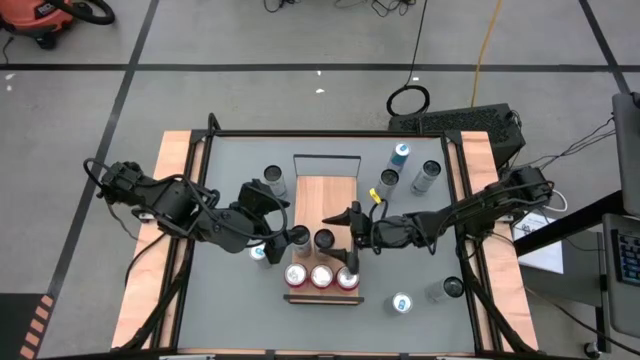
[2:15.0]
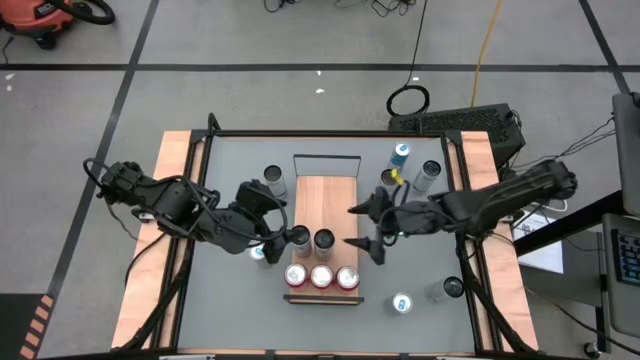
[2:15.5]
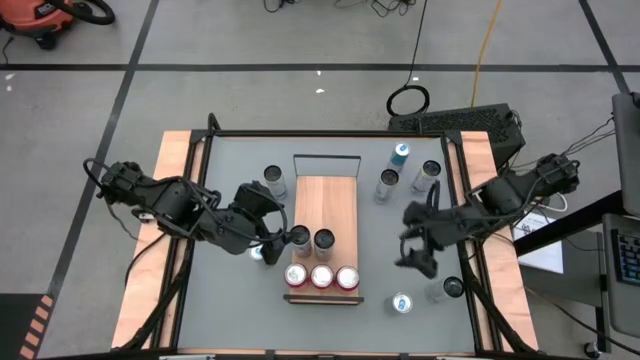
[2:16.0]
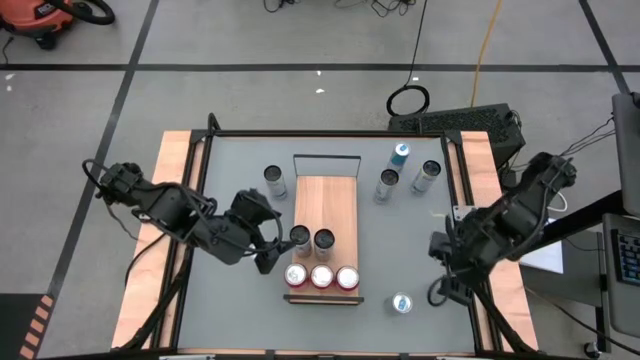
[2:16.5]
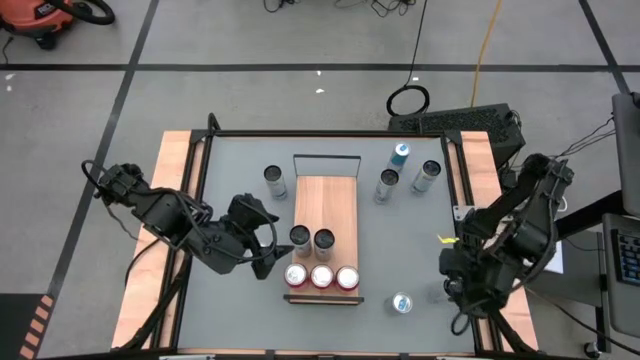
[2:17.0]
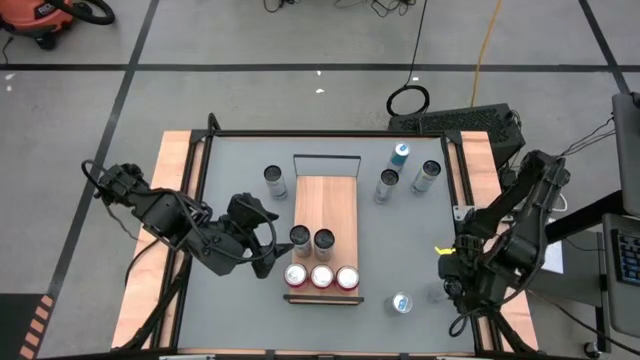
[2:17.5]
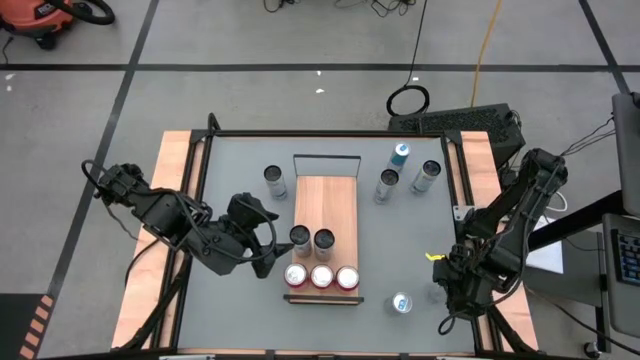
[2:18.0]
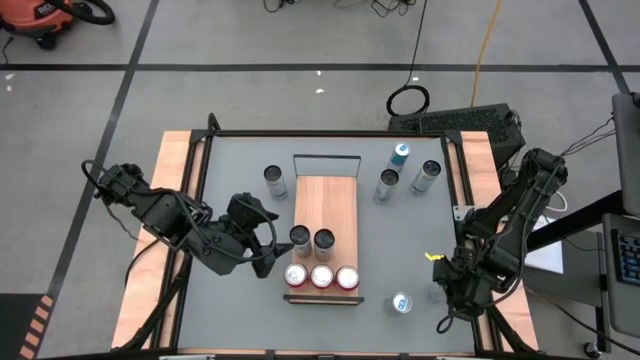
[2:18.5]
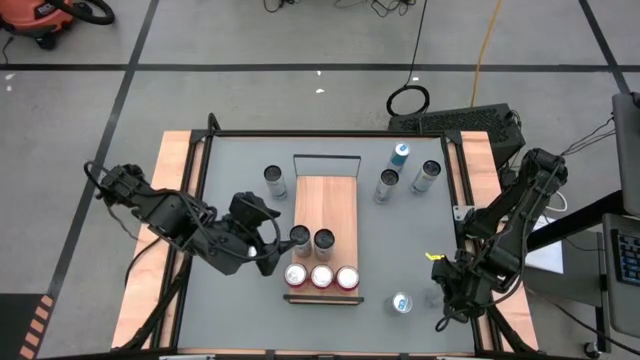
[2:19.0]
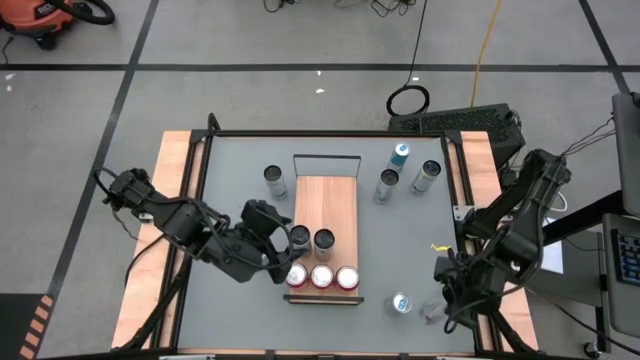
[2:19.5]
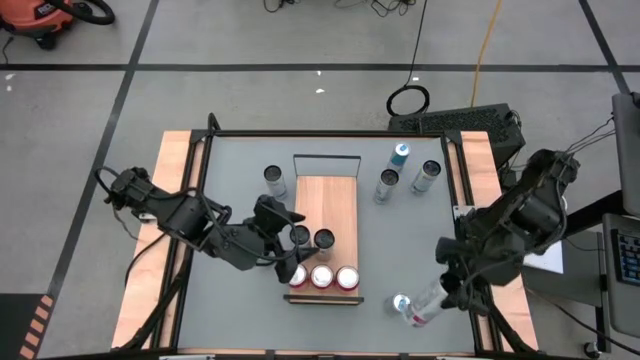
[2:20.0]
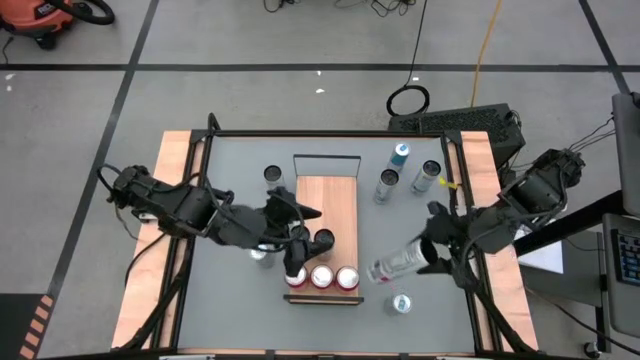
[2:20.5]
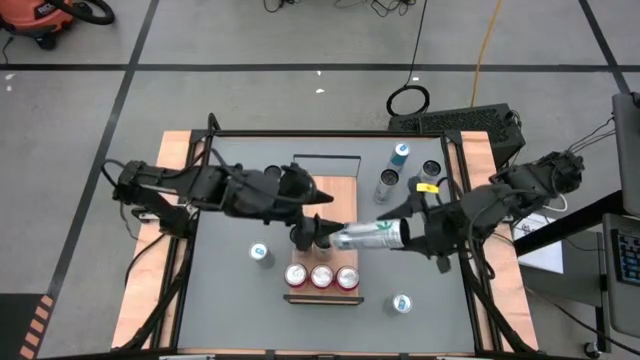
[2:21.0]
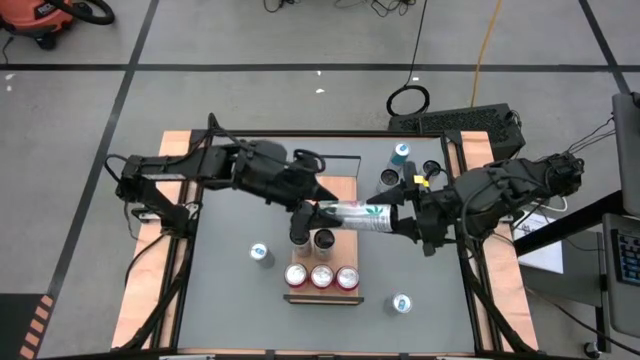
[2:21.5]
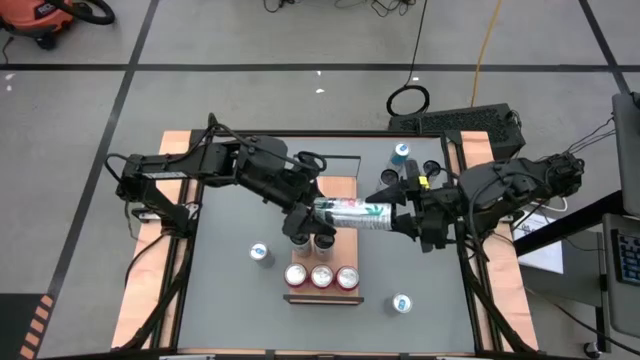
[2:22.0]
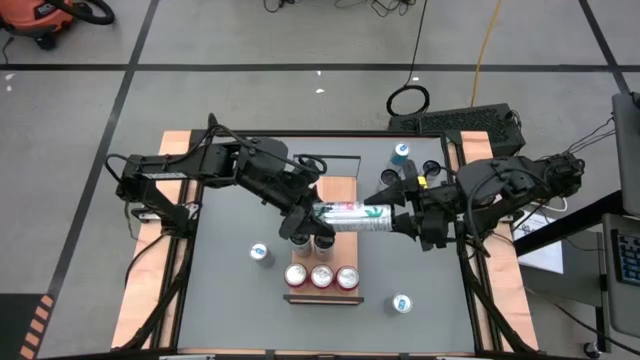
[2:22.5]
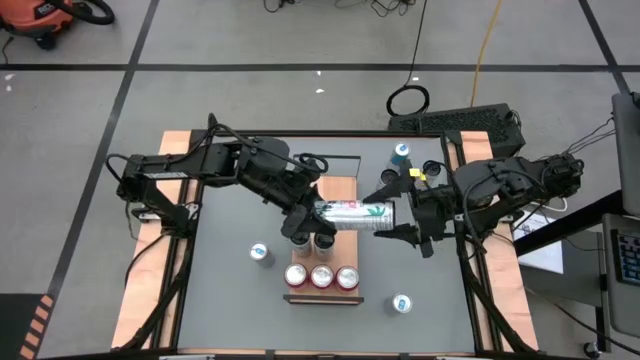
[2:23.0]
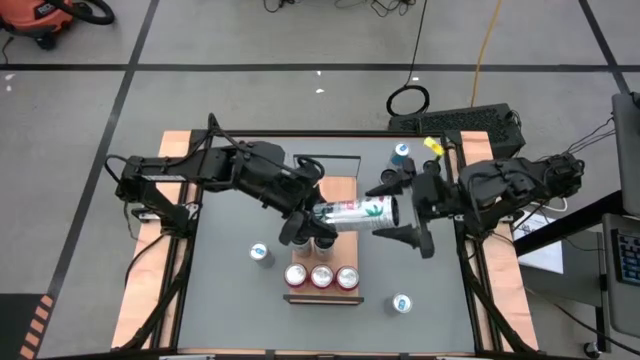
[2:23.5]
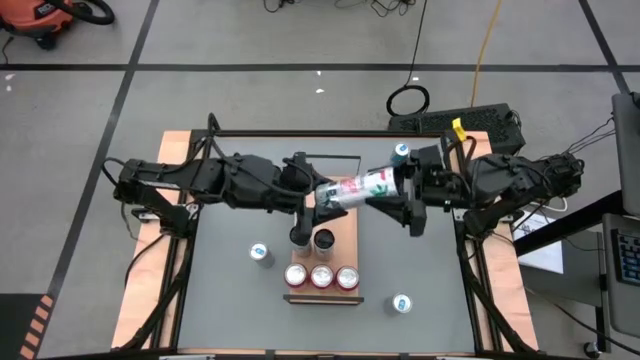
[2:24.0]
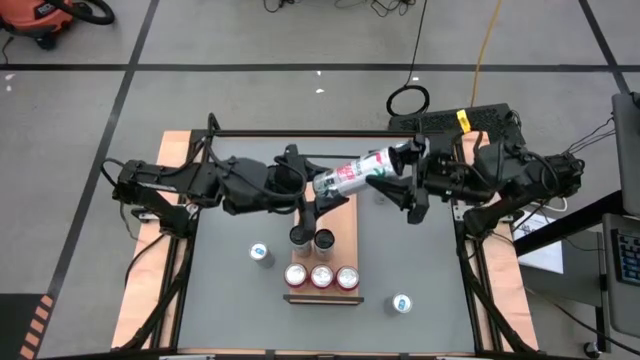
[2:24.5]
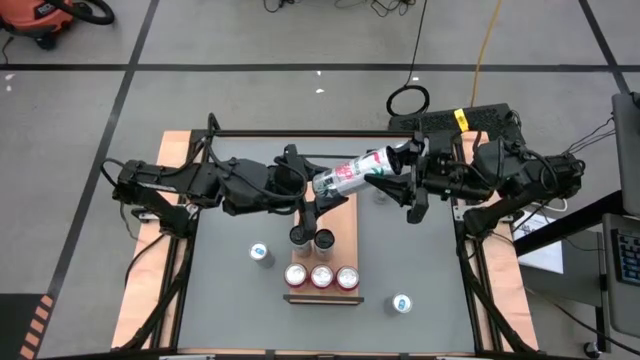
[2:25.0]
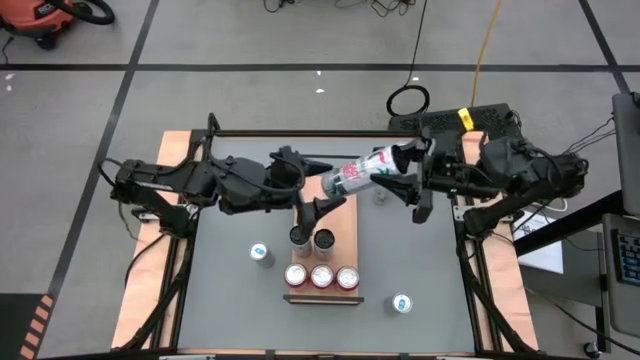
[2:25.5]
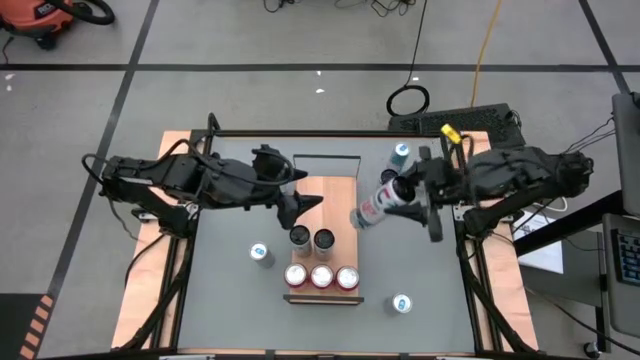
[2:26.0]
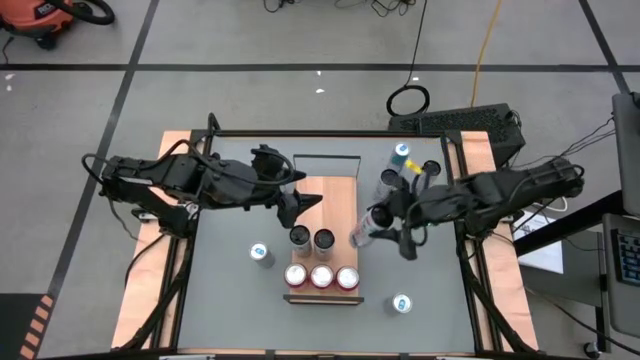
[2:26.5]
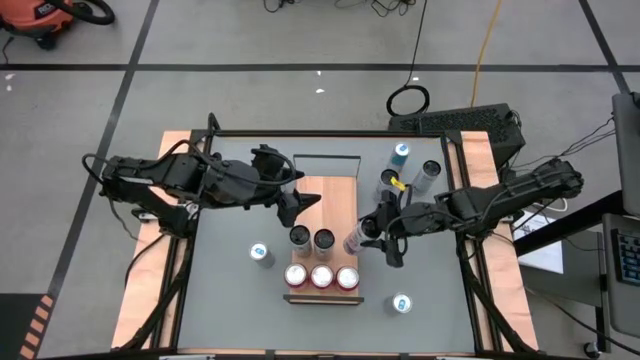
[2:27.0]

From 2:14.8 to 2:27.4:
Task: Sort soda cans
Put the white pink soda can on the shelf and align it with the other white pink soda cans
